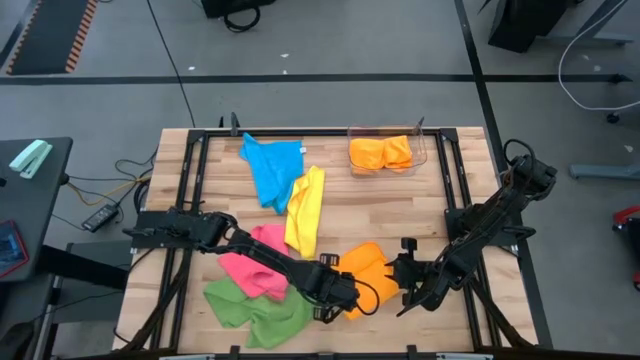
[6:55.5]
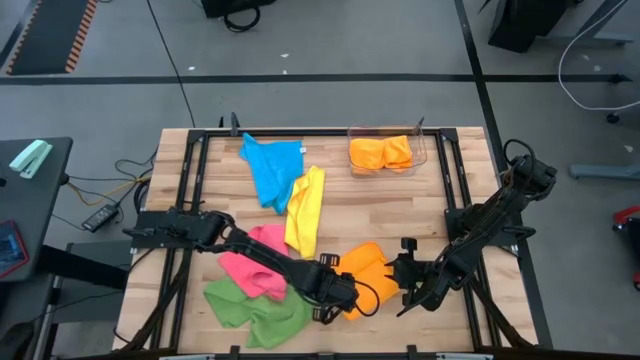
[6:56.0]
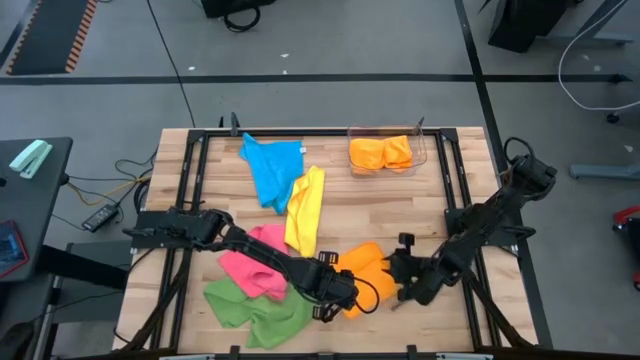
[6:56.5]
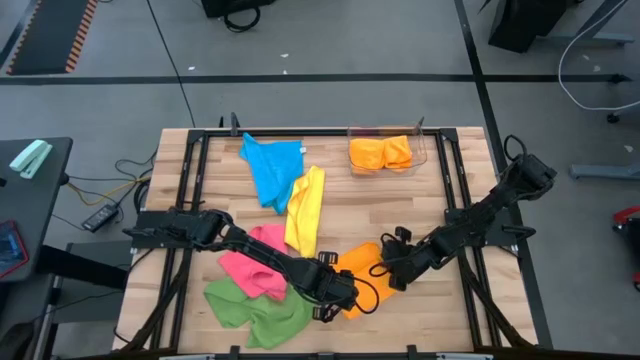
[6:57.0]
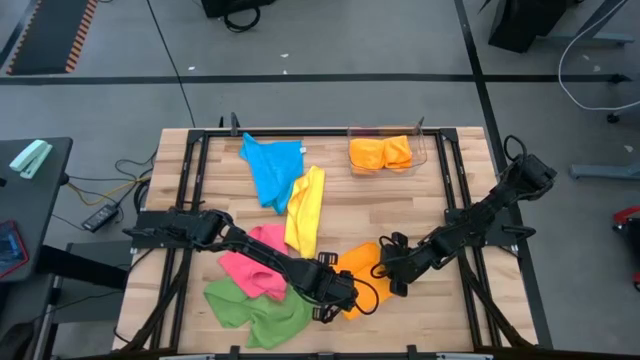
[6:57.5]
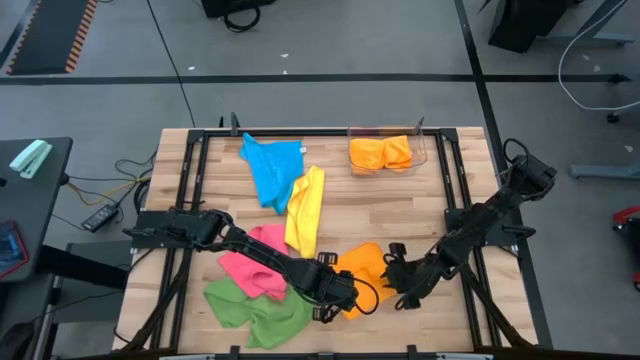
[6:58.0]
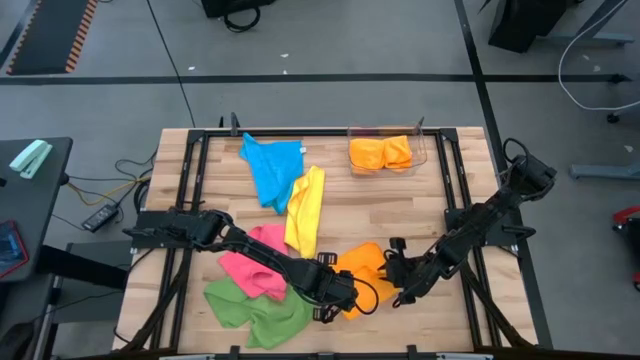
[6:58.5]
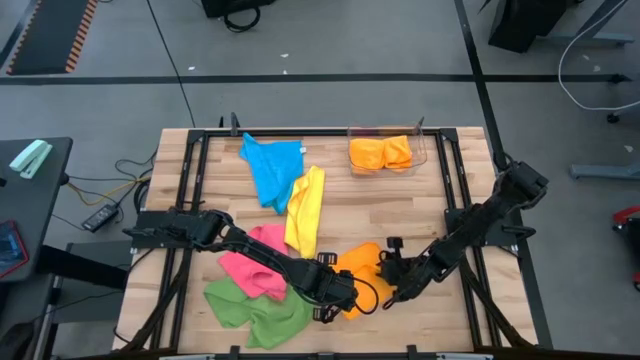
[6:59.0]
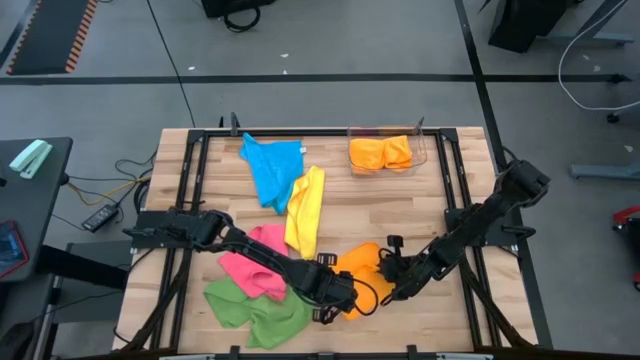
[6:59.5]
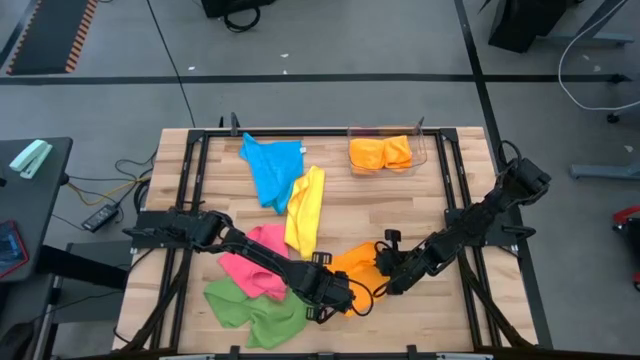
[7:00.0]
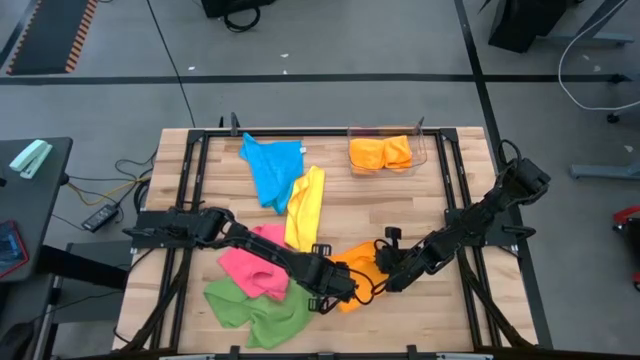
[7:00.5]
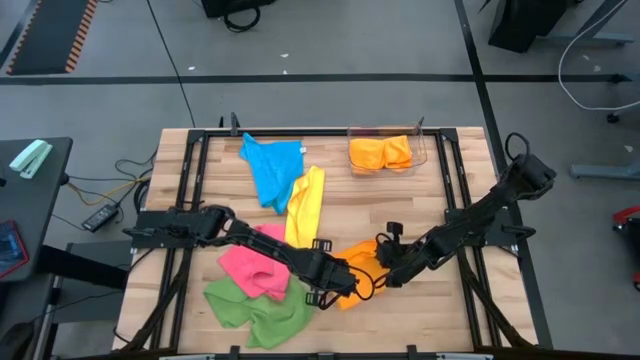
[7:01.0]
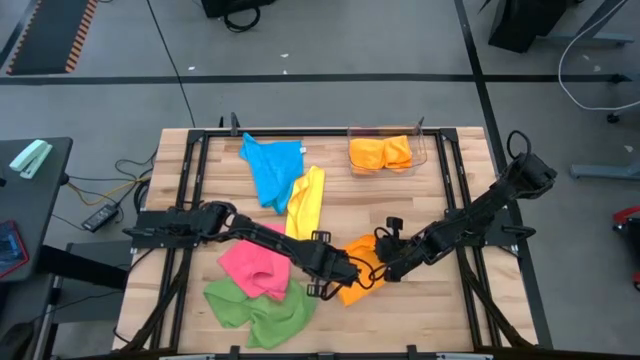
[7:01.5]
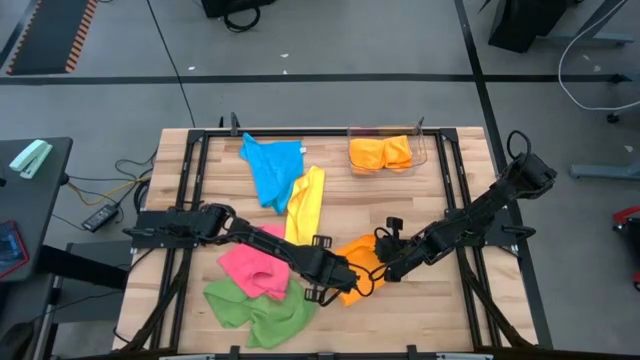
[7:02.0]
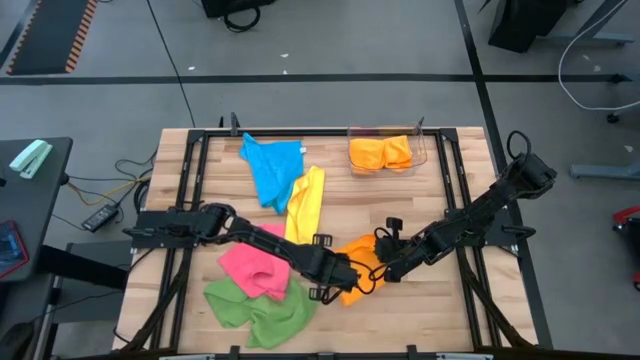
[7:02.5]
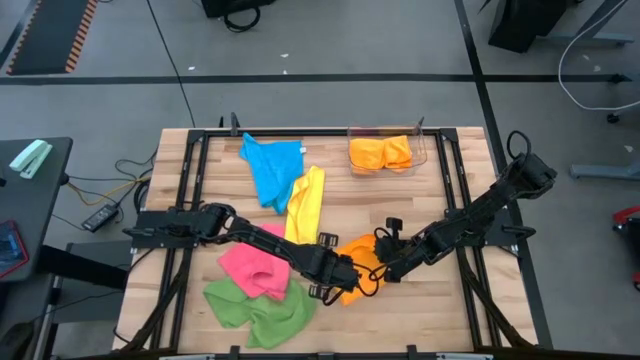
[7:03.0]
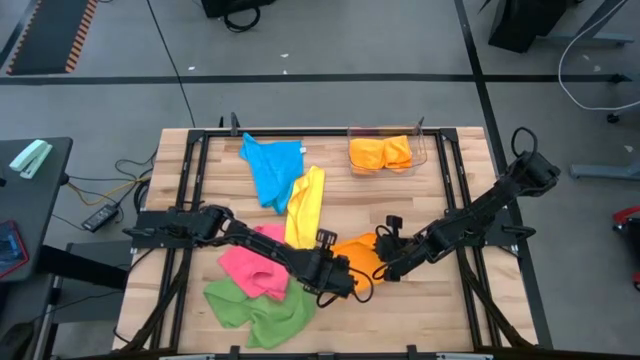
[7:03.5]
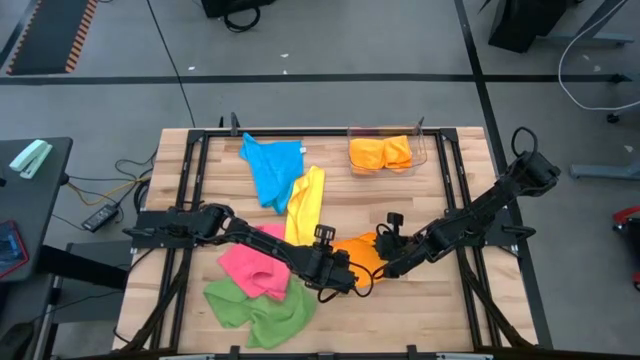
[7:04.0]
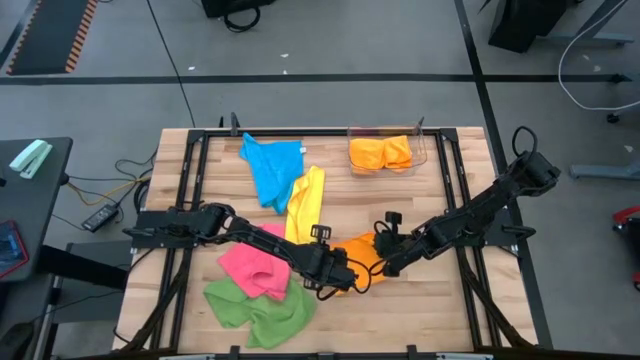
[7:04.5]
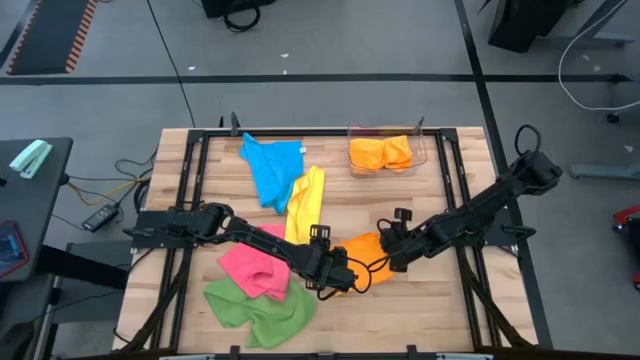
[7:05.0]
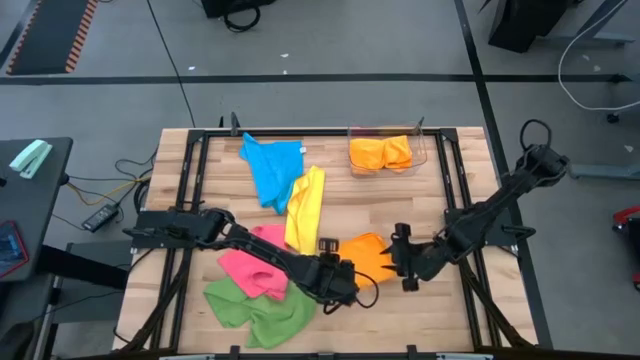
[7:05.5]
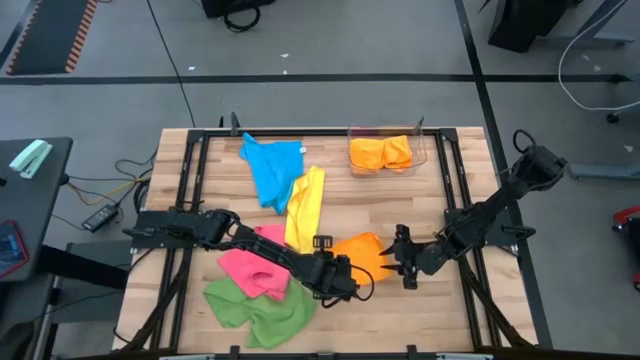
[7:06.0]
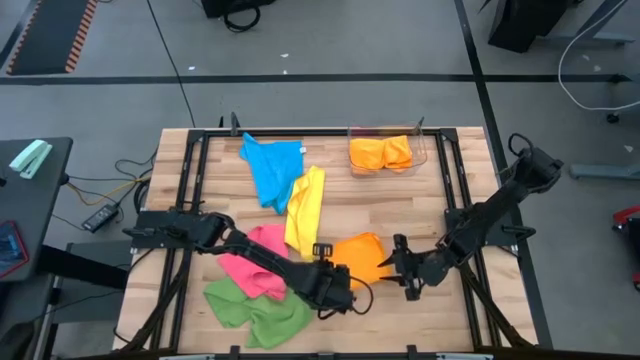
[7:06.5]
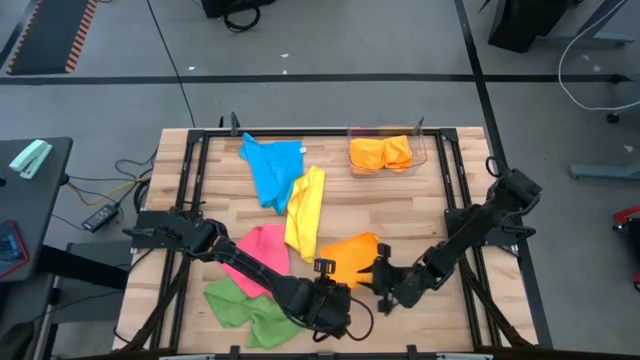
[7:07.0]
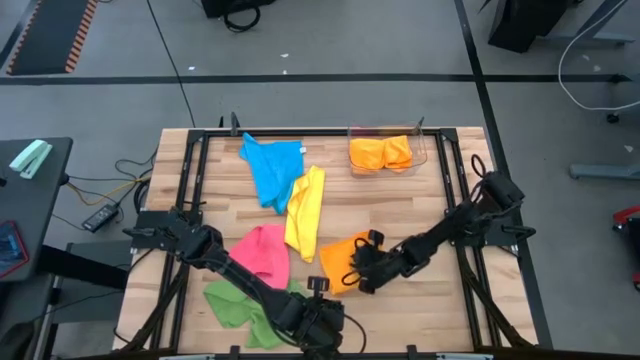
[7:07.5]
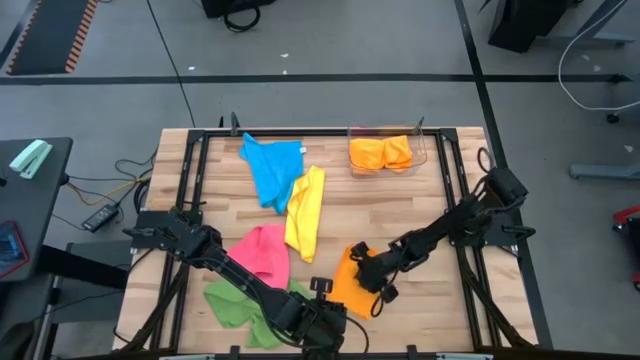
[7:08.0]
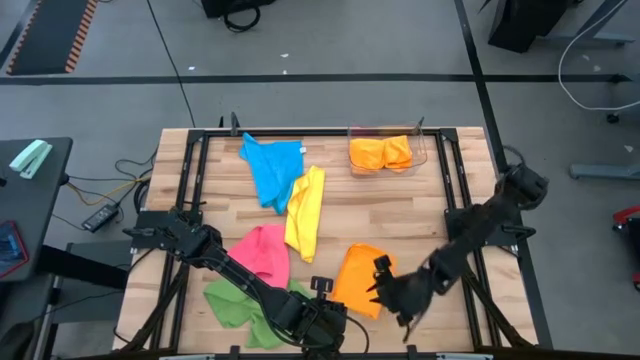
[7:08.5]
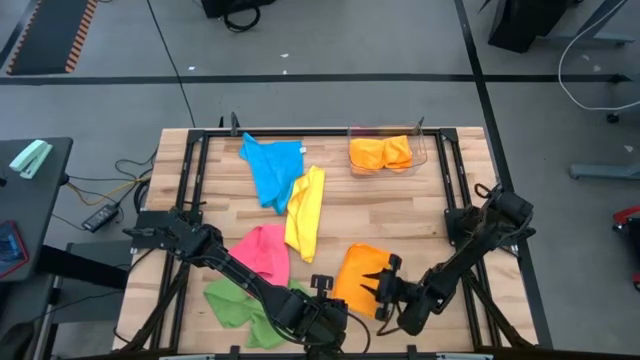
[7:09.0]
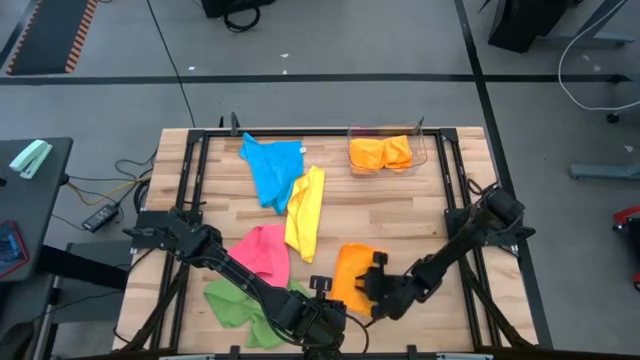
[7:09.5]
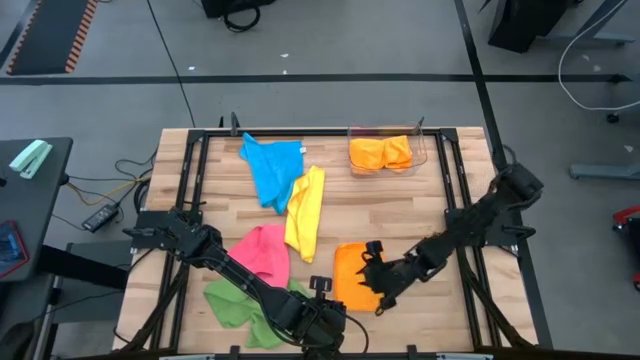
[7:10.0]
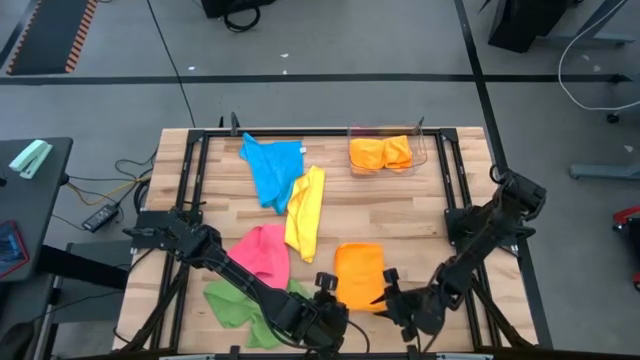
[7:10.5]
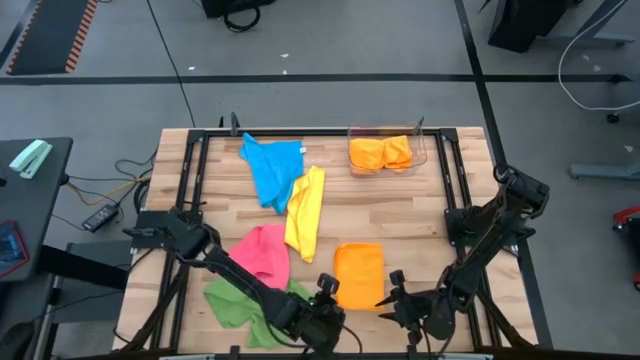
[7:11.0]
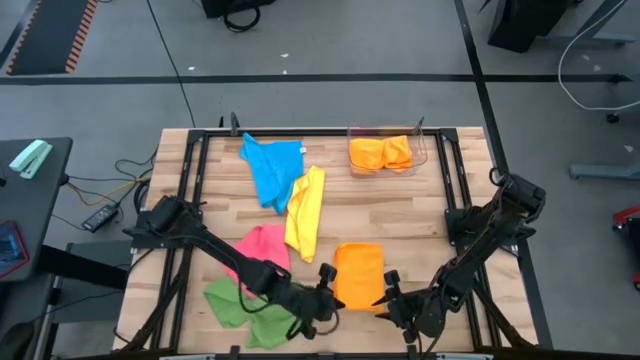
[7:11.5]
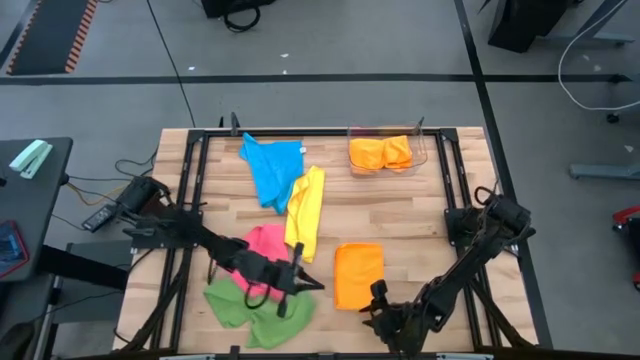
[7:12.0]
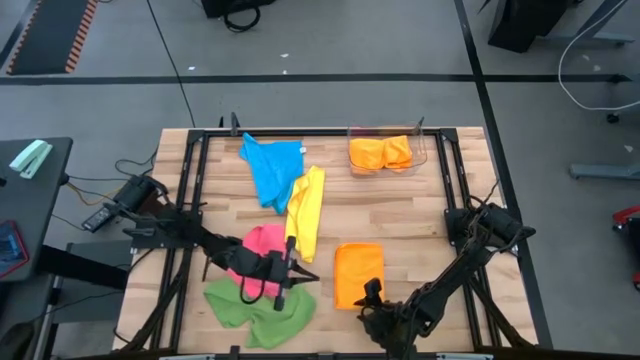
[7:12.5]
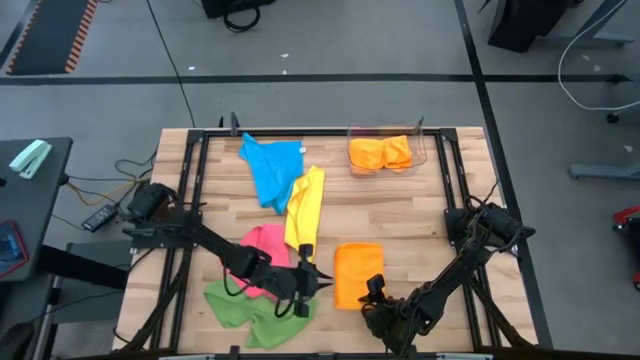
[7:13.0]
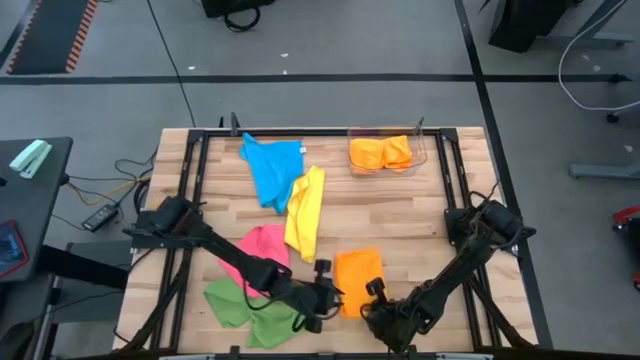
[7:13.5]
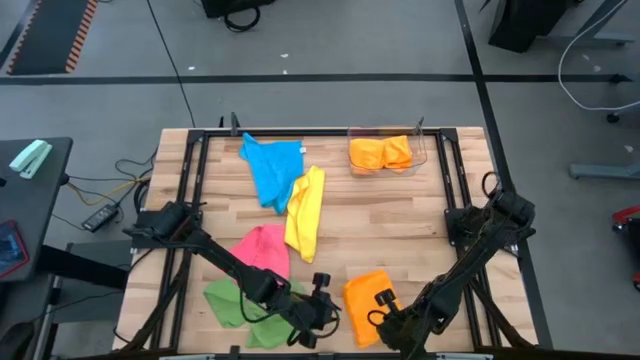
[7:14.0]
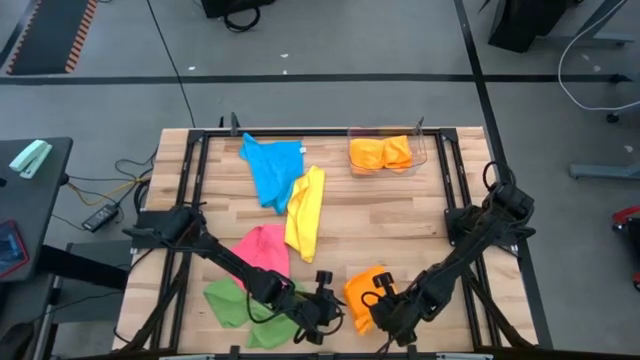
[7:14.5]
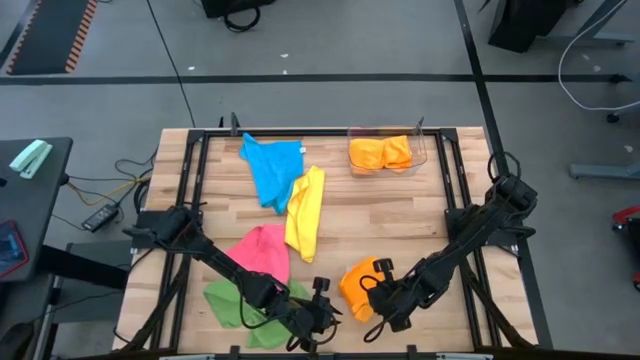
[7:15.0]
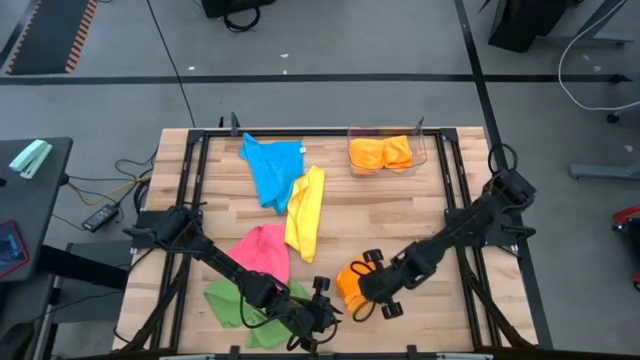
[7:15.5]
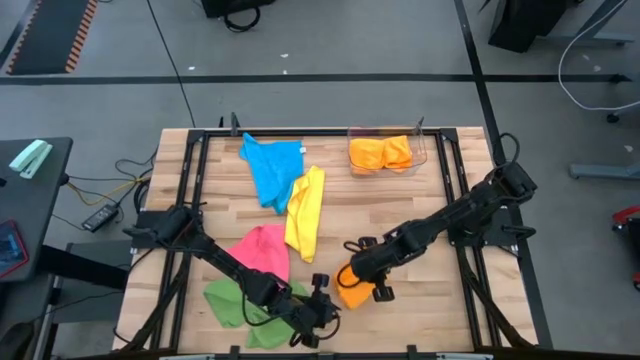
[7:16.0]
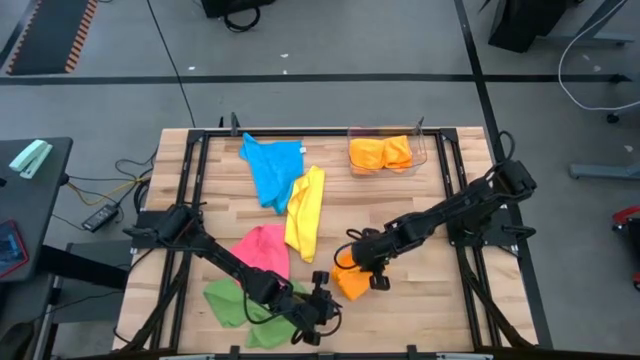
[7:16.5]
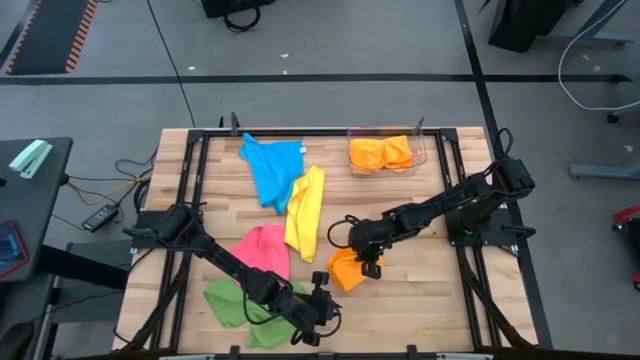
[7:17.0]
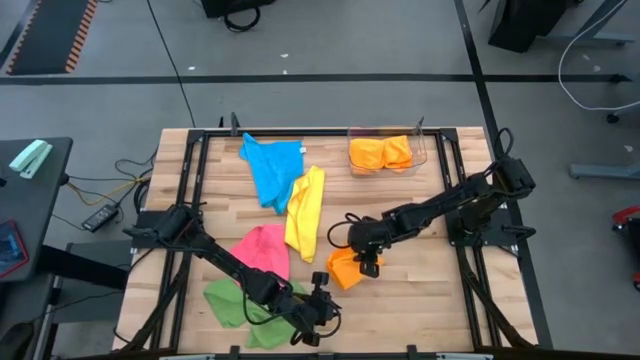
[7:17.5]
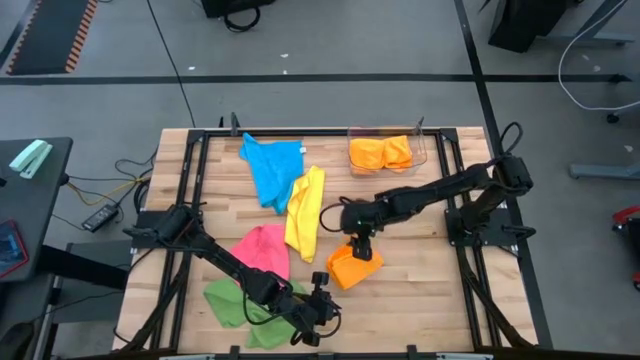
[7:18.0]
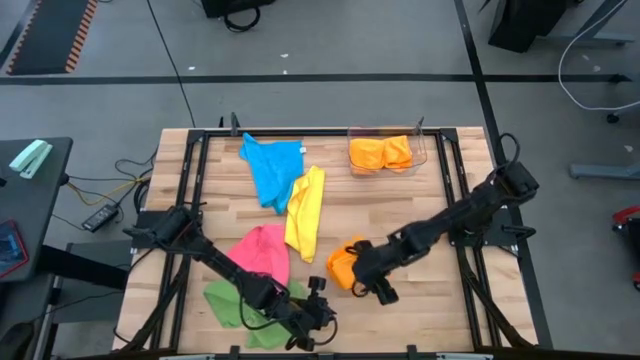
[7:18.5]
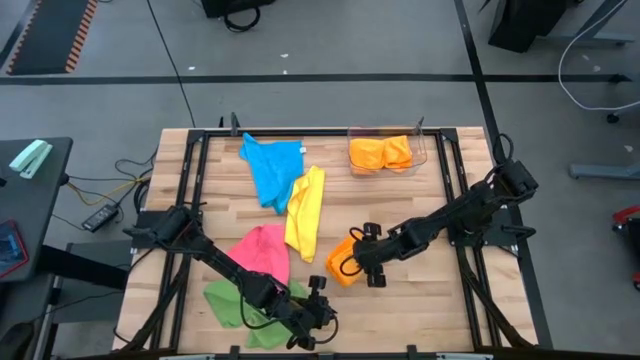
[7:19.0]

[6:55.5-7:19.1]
Task: Fold microfiber towels
Fold the orange microfiber cloth
